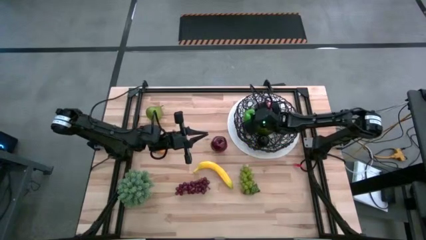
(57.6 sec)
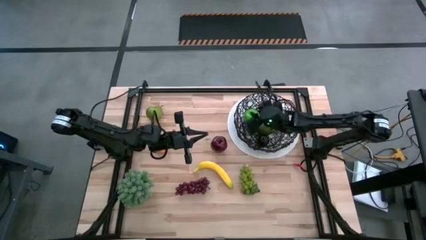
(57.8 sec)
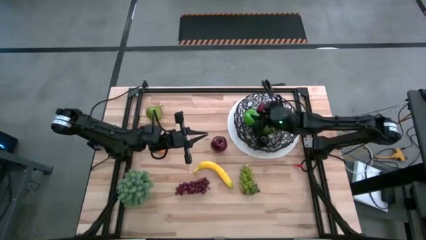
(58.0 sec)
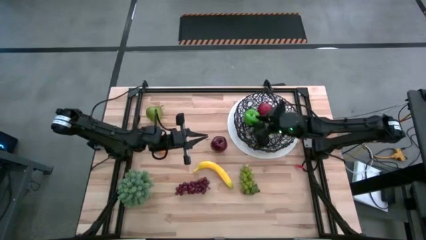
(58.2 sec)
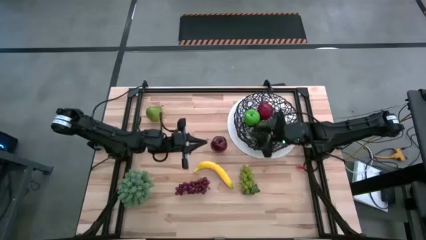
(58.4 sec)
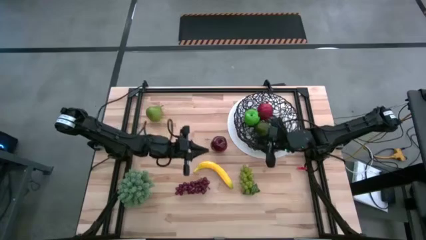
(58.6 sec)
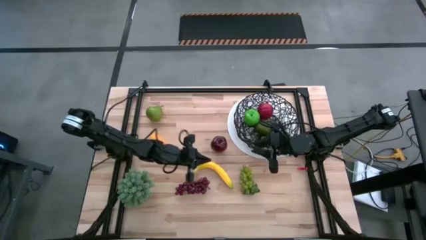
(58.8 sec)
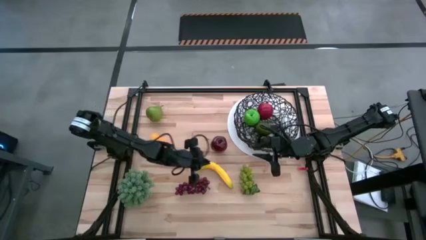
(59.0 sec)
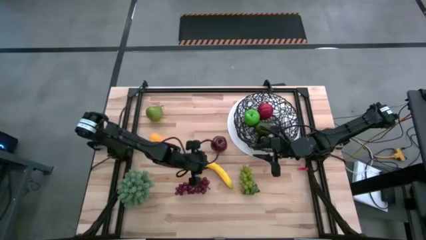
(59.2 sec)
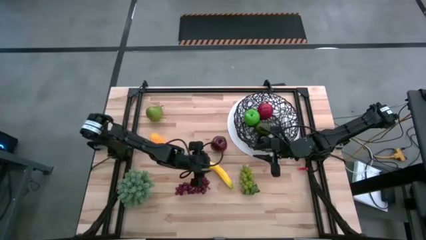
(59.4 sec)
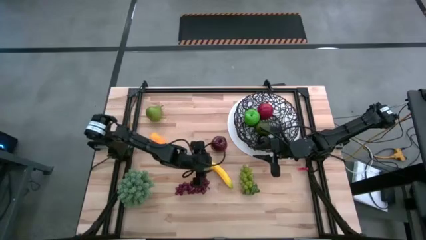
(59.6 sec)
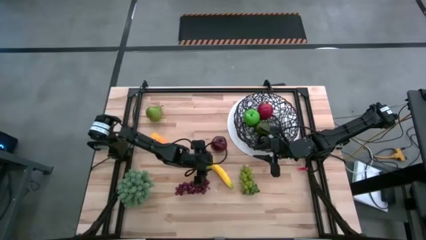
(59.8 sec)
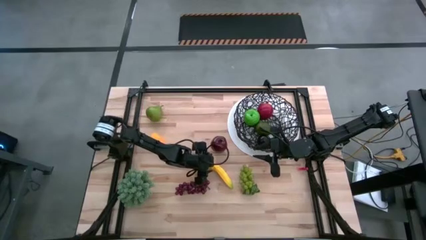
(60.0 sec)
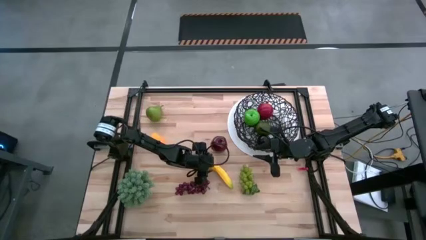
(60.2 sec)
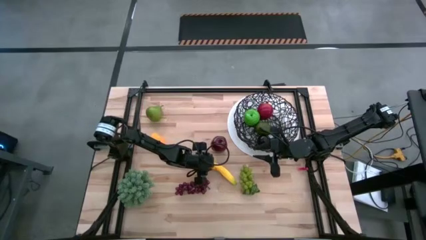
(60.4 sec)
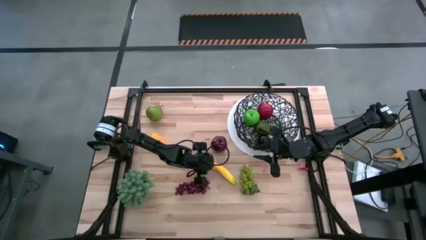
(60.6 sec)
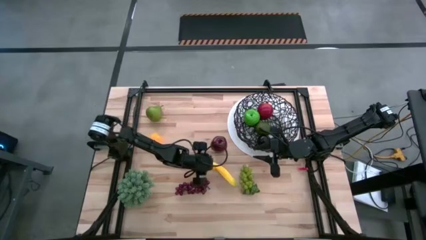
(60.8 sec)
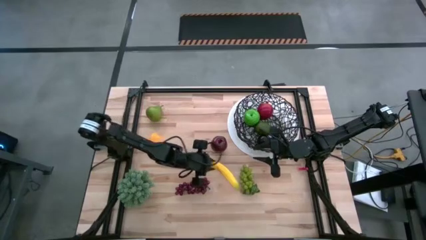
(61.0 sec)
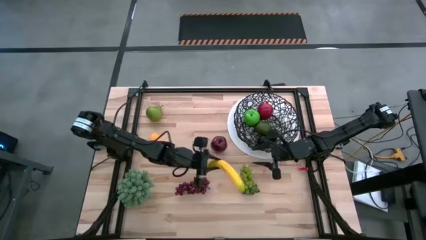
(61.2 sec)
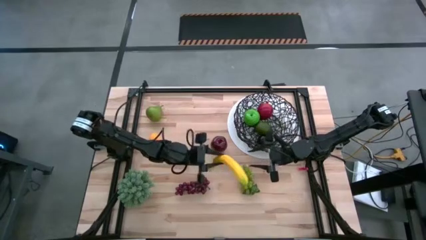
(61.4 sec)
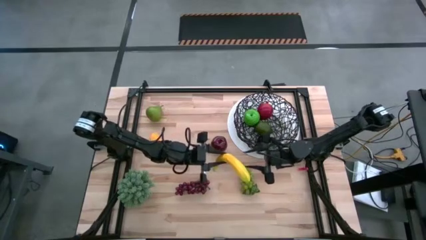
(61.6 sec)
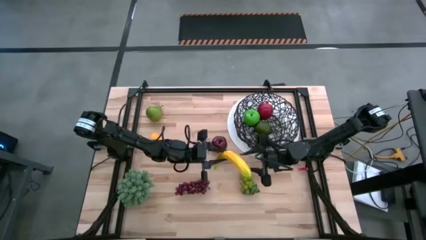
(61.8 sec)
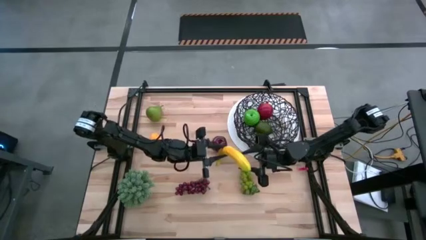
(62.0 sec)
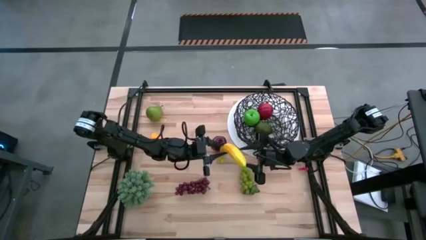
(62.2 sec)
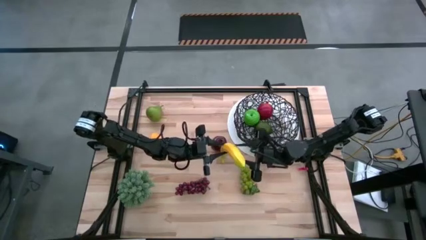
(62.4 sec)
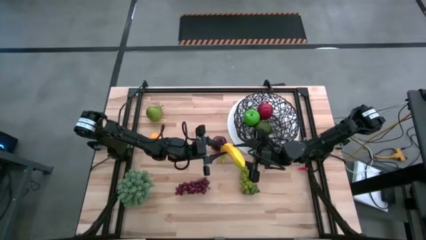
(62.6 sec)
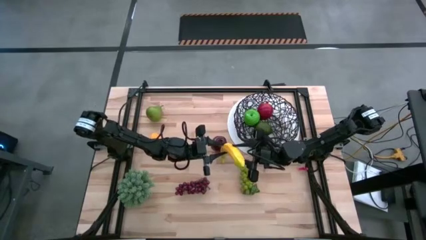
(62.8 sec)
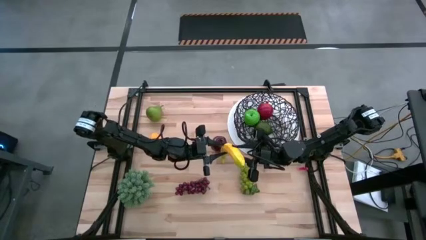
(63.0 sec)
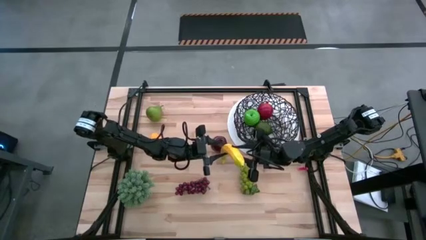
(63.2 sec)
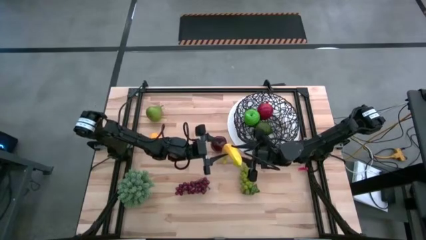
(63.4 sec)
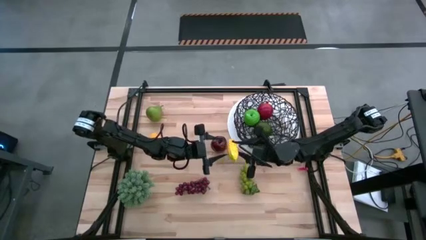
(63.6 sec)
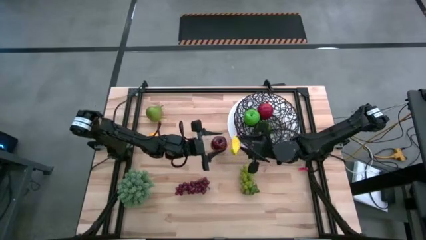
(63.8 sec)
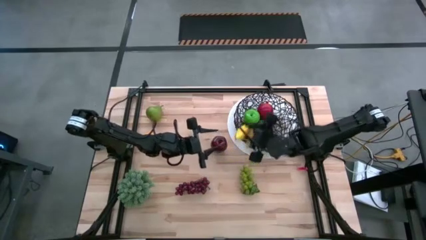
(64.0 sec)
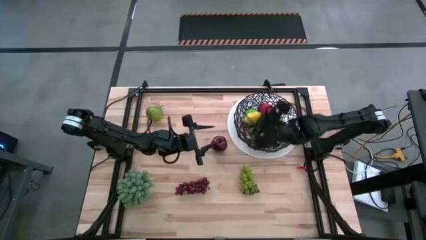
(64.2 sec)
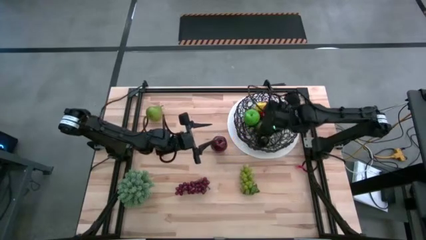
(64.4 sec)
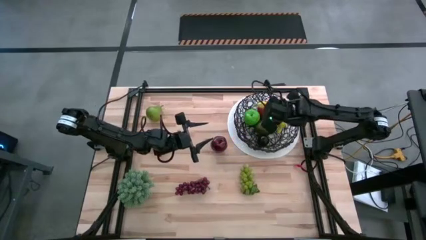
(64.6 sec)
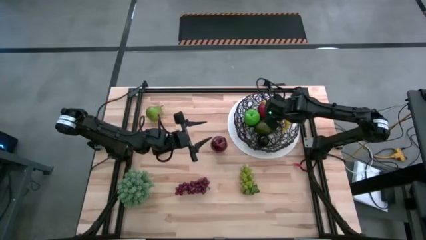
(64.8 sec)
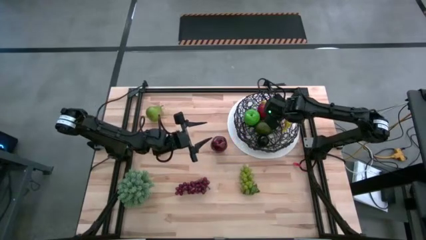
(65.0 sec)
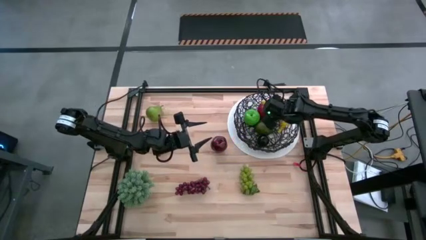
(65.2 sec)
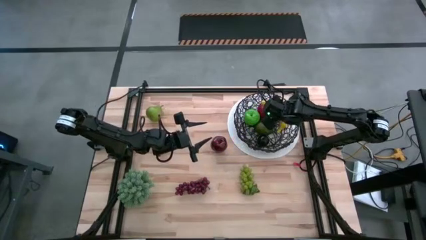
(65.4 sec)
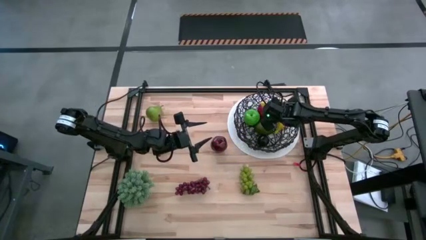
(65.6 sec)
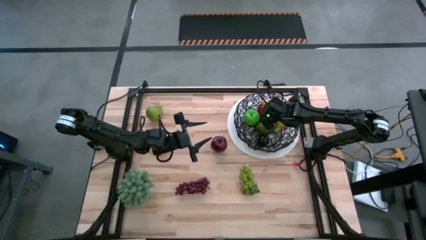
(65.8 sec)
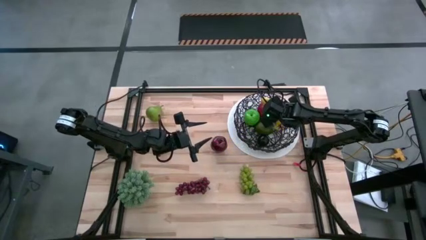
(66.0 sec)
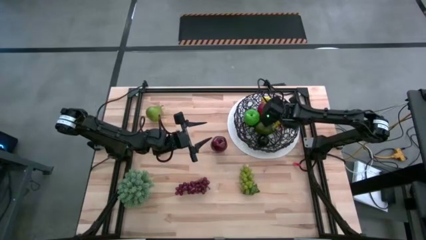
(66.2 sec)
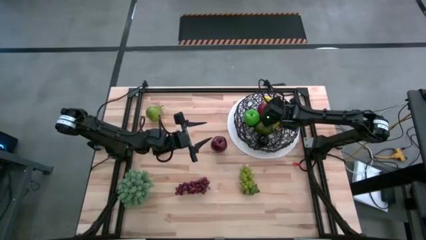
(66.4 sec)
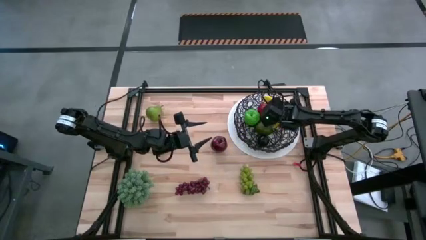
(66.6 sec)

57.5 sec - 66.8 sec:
Task: Build produce basket
Put the yellow banana into the wire basket

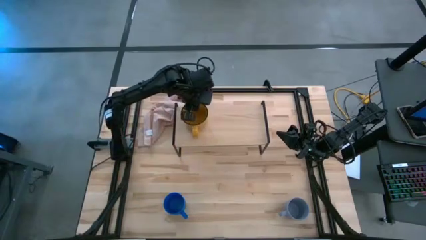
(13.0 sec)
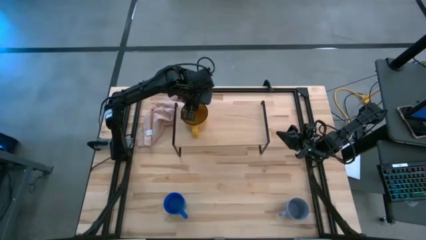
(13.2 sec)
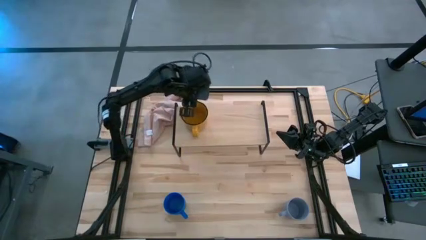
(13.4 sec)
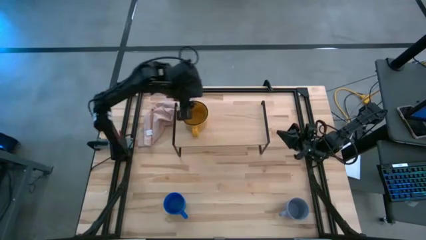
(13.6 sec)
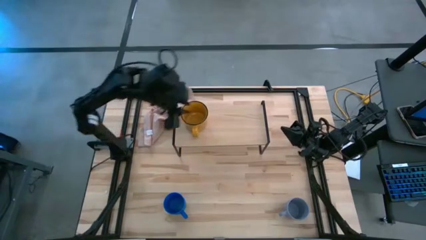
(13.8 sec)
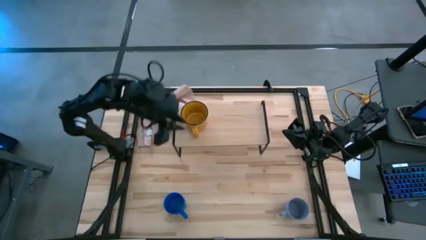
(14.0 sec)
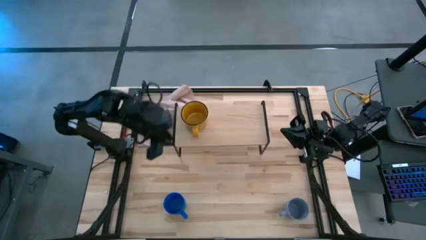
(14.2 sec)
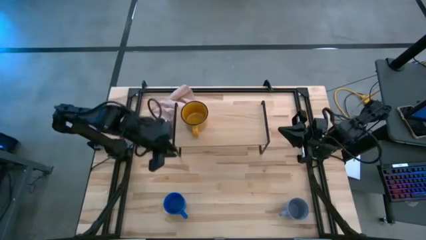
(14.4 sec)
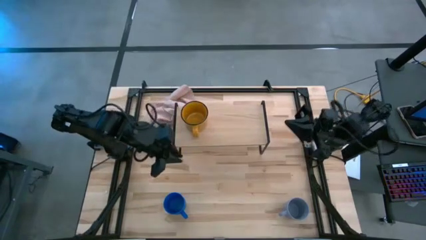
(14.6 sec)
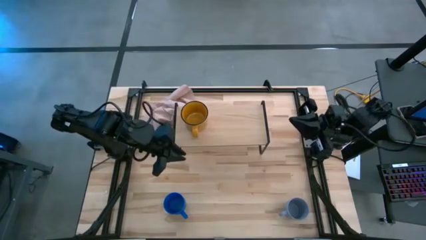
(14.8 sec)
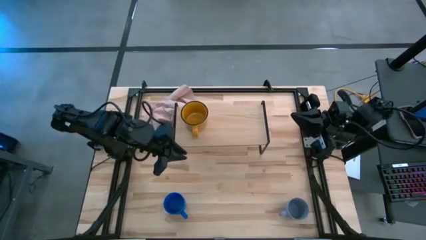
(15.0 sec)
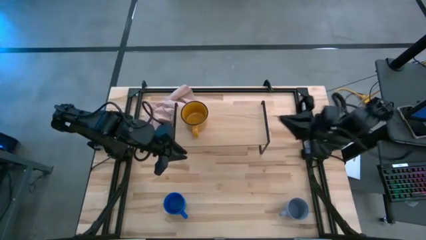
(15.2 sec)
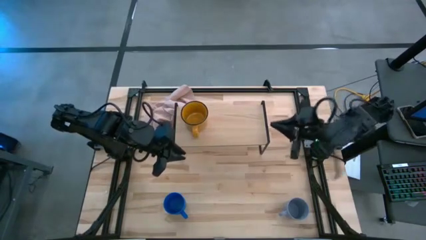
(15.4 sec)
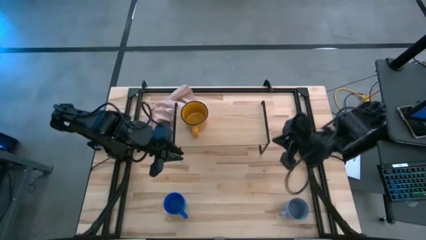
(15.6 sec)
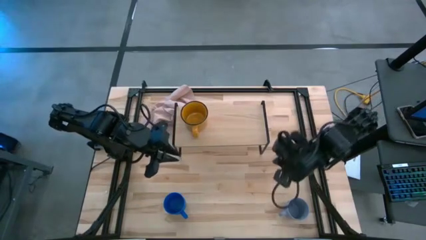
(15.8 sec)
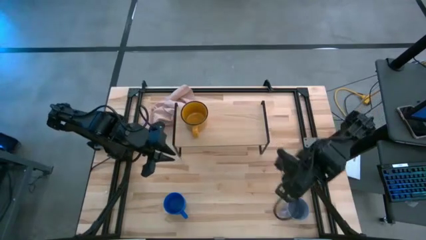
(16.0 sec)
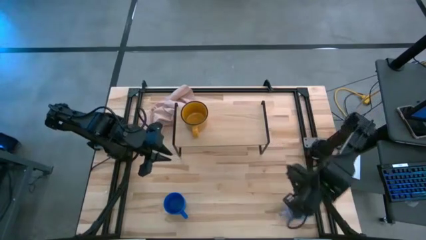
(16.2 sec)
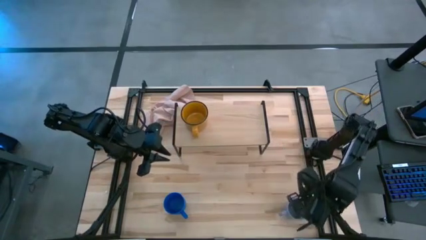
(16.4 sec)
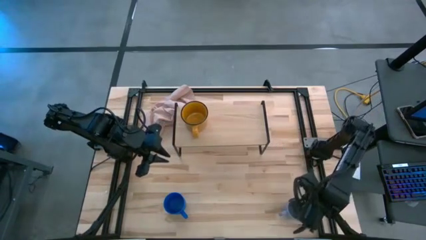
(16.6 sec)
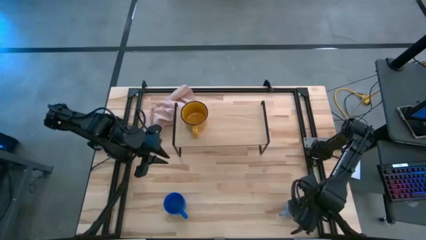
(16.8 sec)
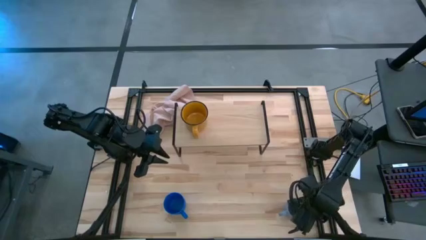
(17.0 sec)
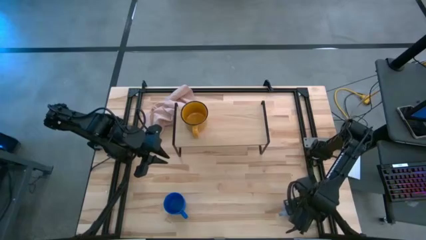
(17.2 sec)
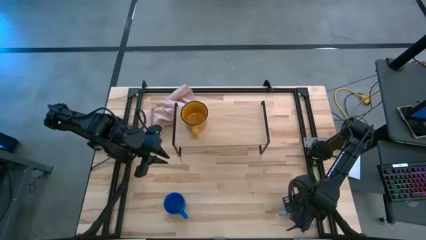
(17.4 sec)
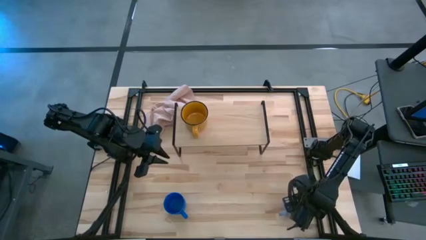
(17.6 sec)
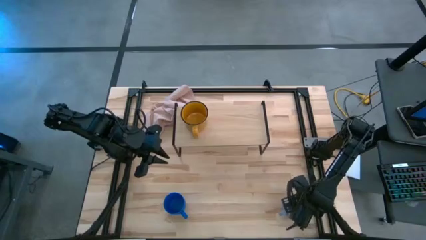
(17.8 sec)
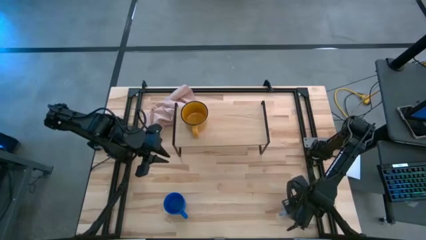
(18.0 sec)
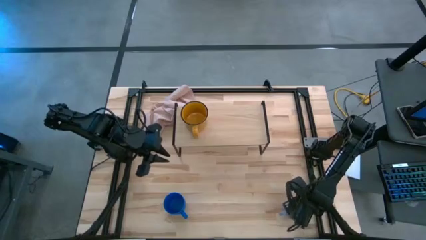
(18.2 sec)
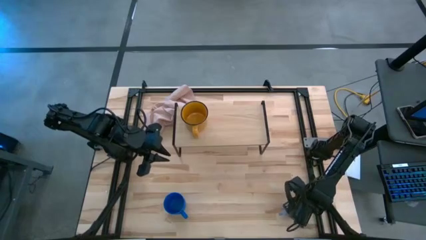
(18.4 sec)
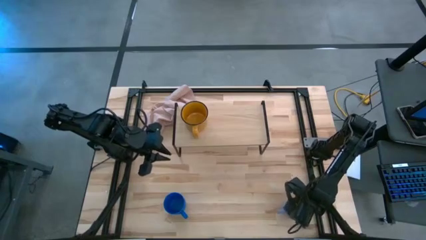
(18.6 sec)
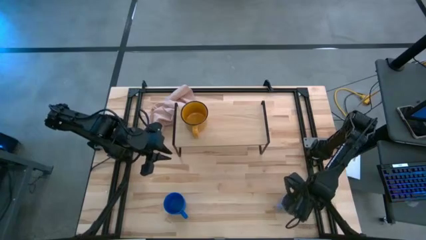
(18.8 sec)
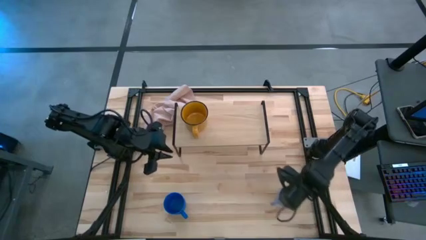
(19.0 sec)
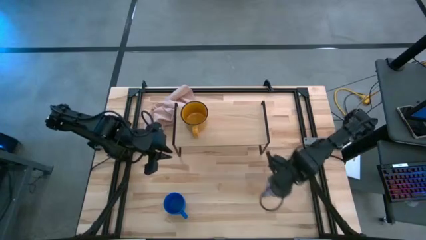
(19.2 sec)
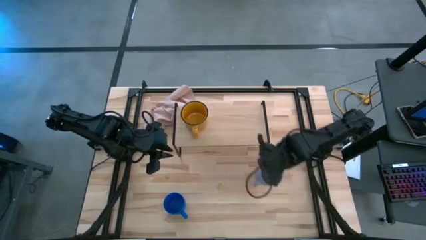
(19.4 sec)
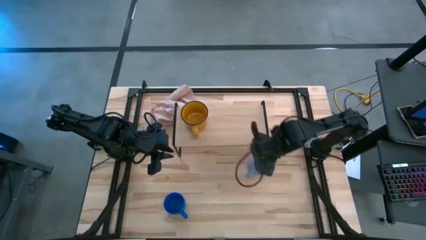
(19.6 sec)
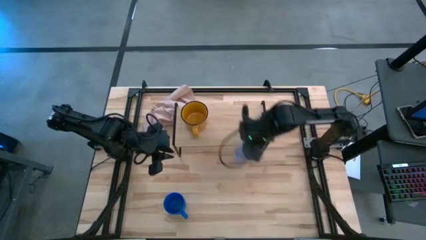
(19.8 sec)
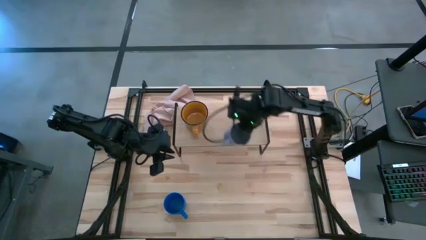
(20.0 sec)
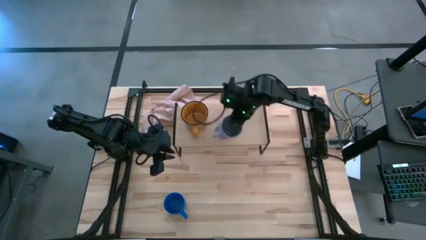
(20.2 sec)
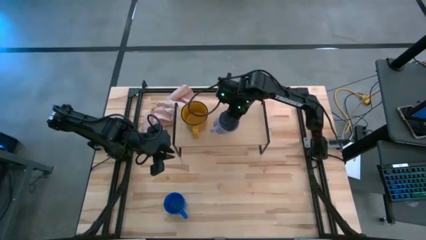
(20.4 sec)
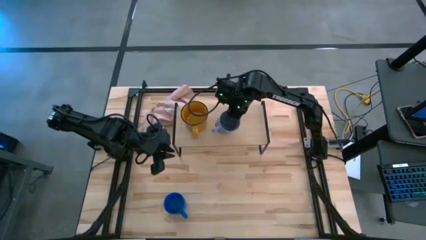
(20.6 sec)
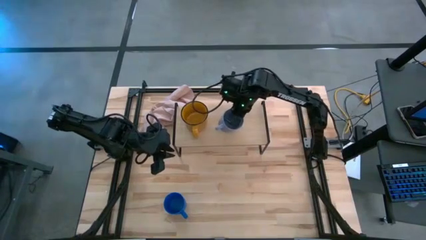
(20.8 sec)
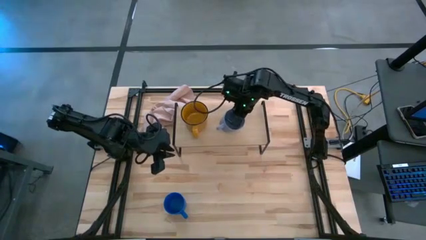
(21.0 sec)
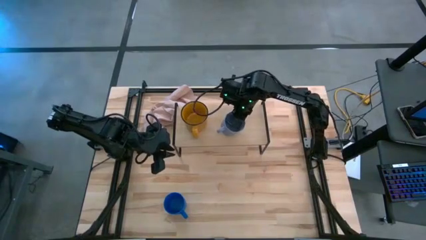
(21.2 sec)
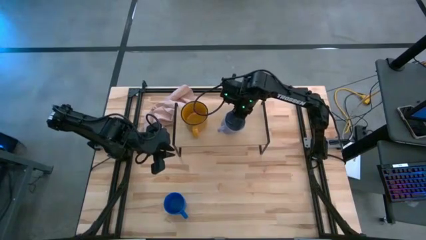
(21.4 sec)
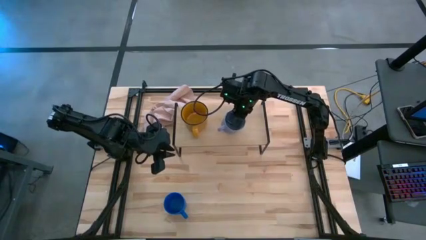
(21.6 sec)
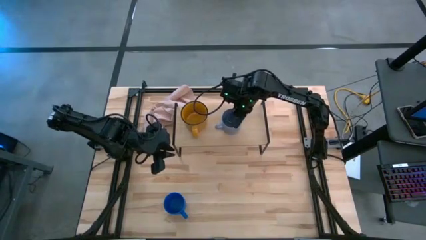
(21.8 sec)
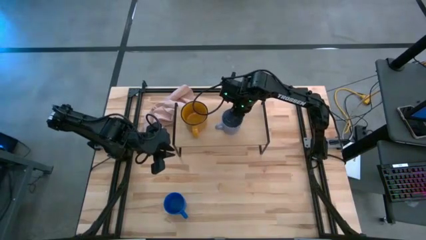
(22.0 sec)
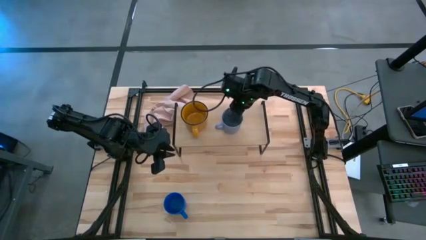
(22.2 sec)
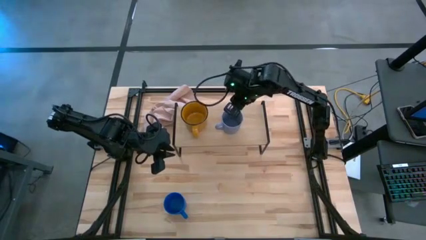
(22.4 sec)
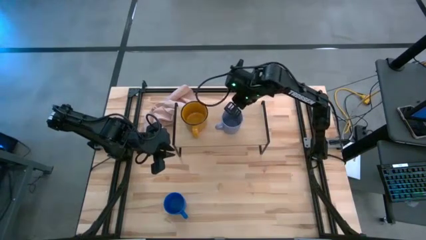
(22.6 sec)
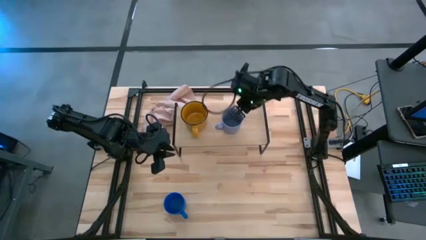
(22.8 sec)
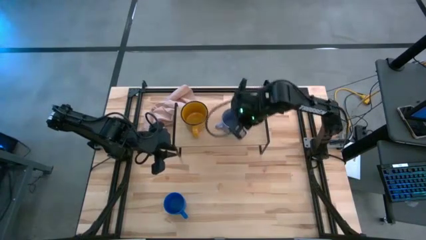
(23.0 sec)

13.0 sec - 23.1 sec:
Task: Stack small to large cups/mugs on shelf
Put the light blue mug on the shelf
